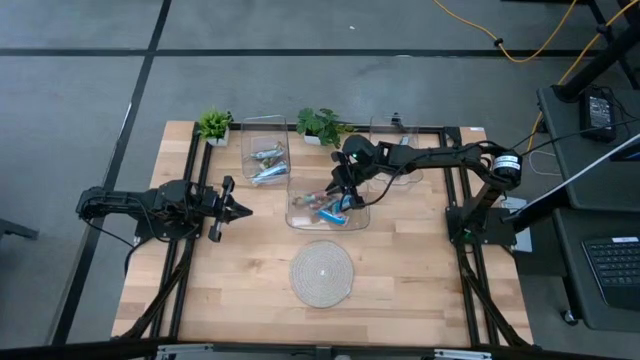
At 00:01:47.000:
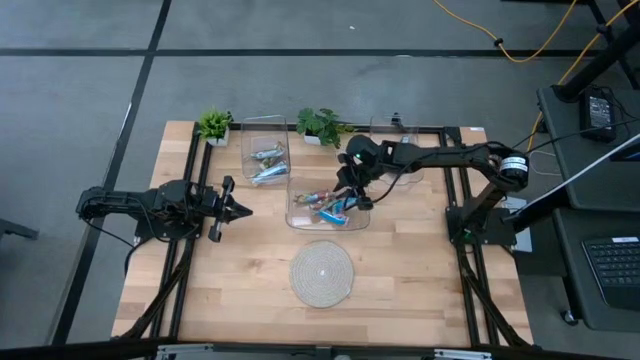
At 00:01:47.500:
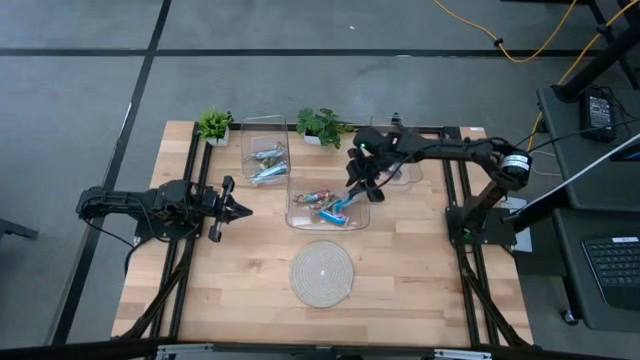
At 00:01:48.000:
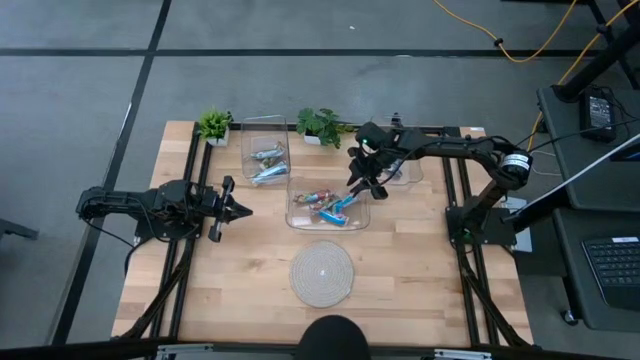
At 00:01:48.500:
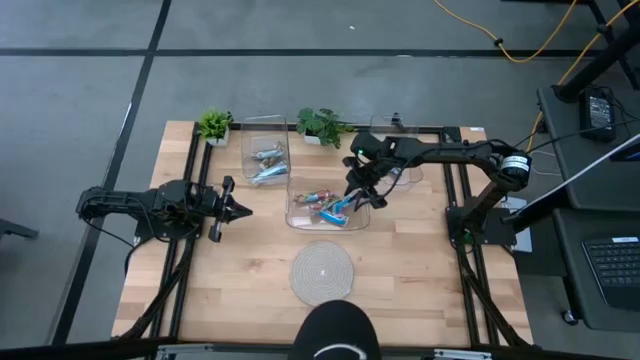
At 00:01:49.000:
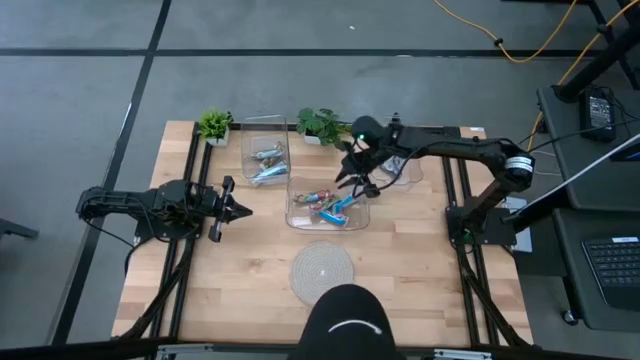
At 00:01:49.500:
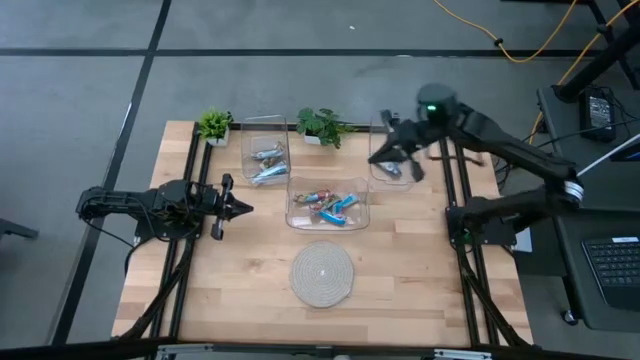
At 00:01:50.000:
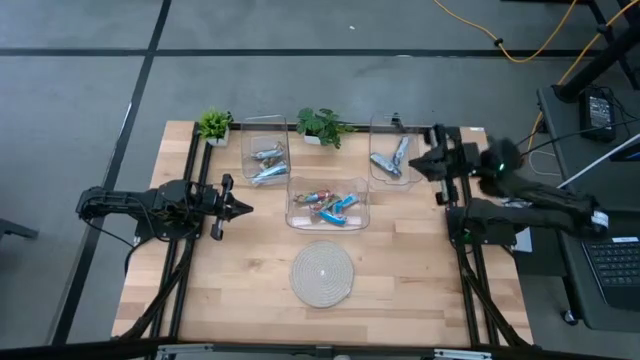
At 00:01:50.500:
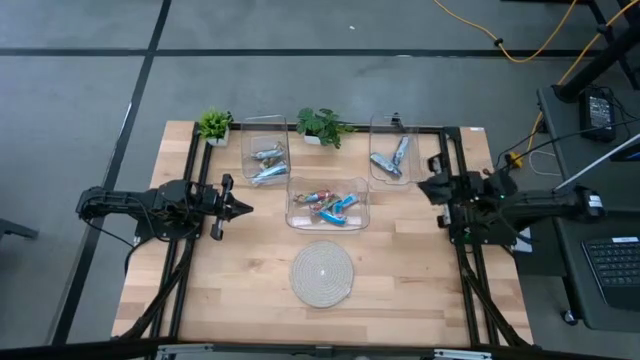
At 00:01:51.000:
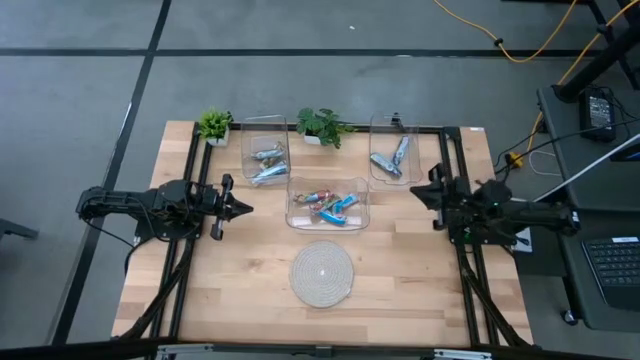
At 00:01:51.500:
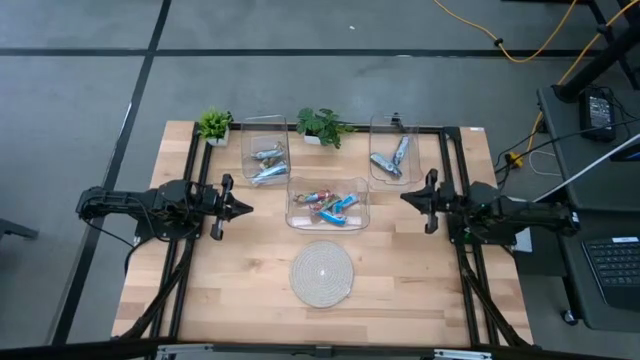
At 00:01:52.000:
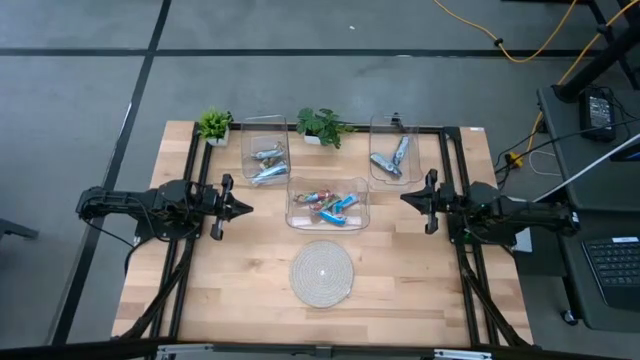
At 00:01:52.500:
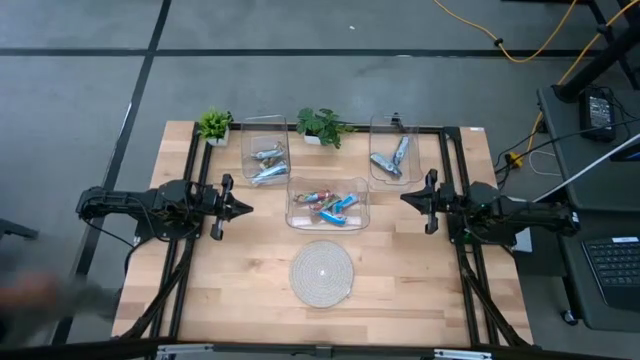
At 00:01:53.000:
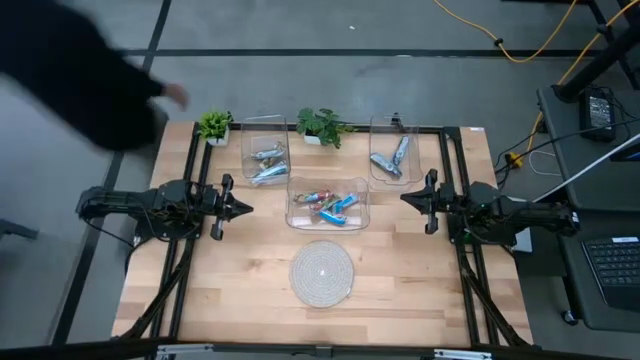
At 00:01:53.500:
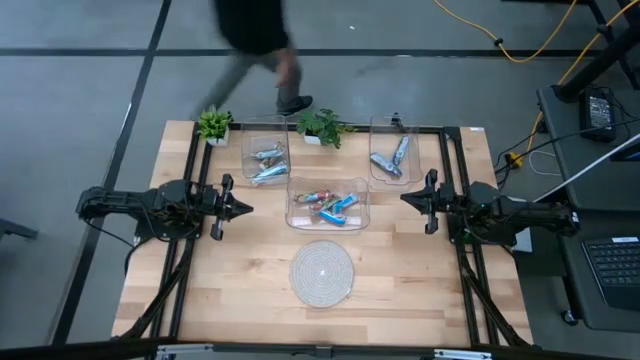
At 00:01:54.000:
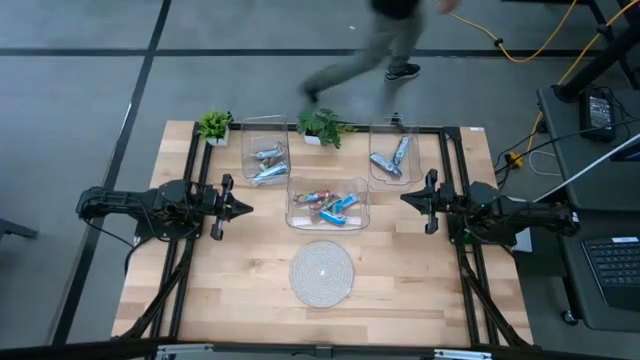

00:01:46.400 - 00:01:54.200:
Task: Pick and place Granola Bars by type
Return to Home Position

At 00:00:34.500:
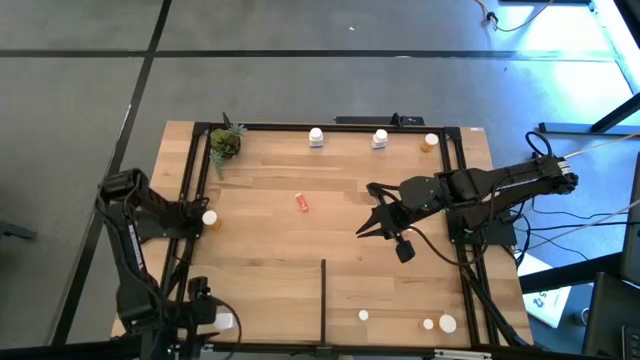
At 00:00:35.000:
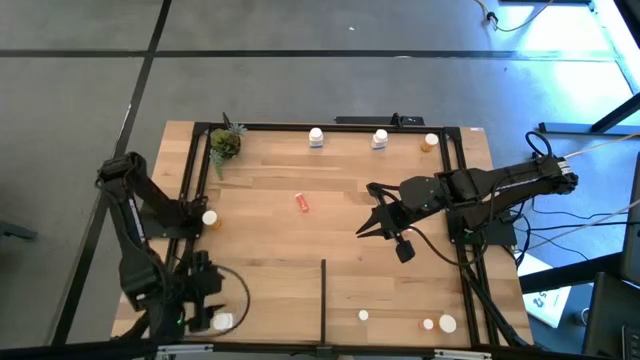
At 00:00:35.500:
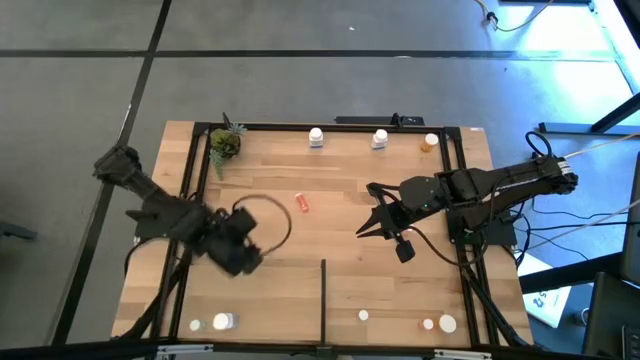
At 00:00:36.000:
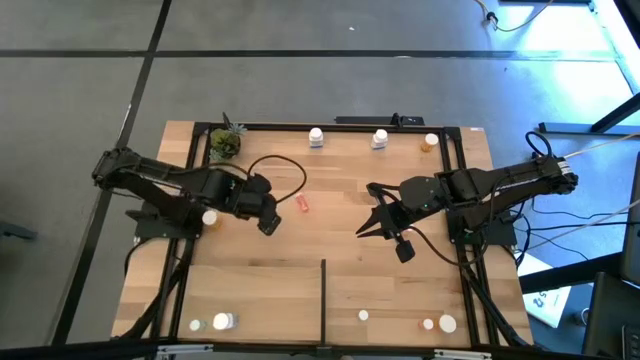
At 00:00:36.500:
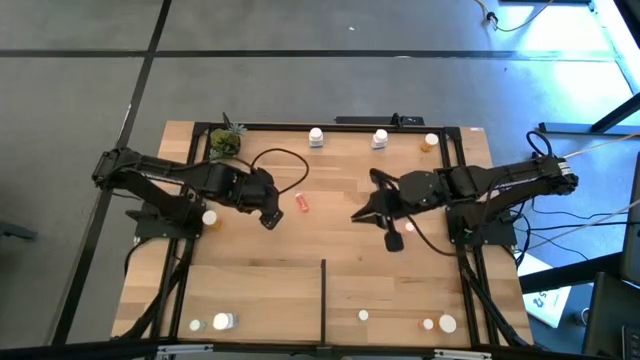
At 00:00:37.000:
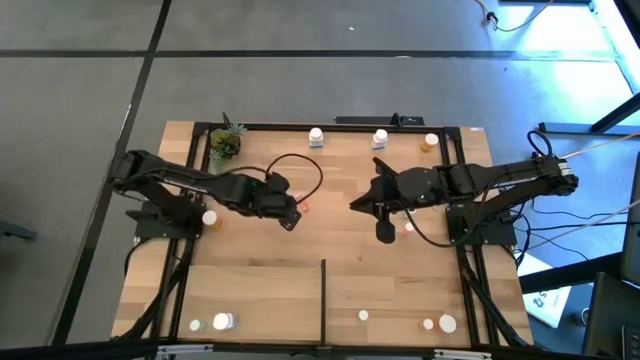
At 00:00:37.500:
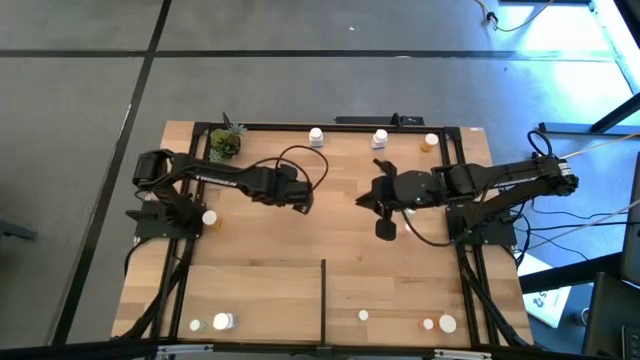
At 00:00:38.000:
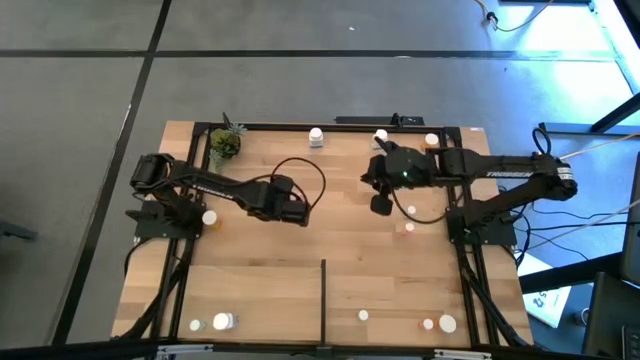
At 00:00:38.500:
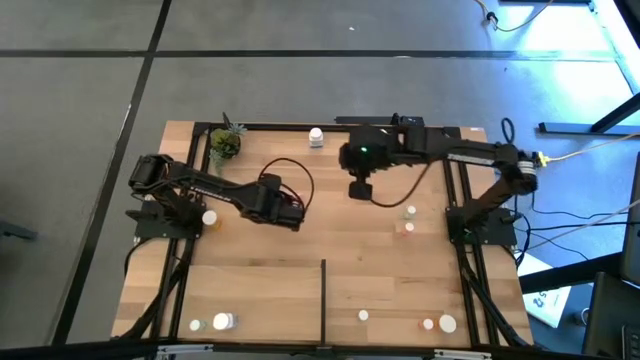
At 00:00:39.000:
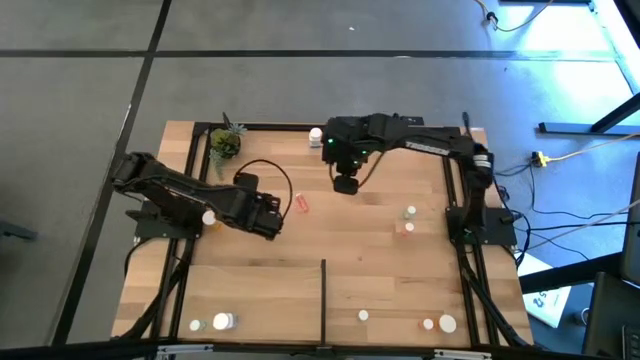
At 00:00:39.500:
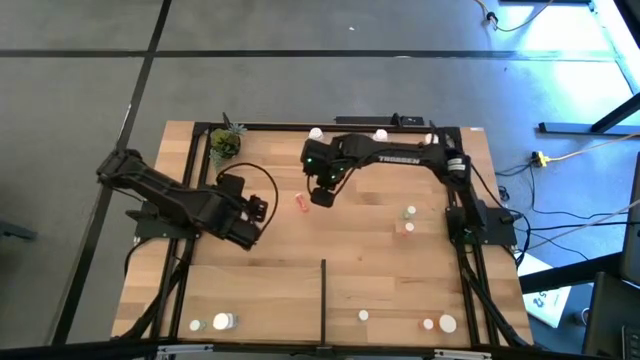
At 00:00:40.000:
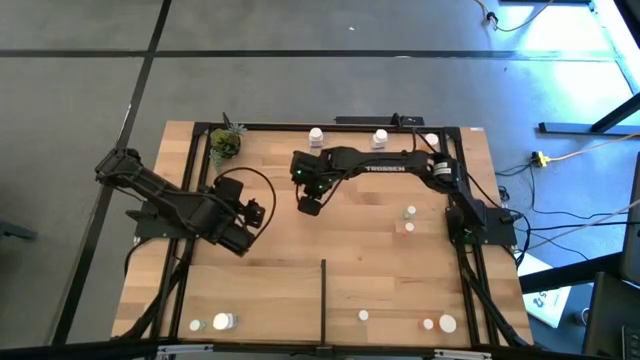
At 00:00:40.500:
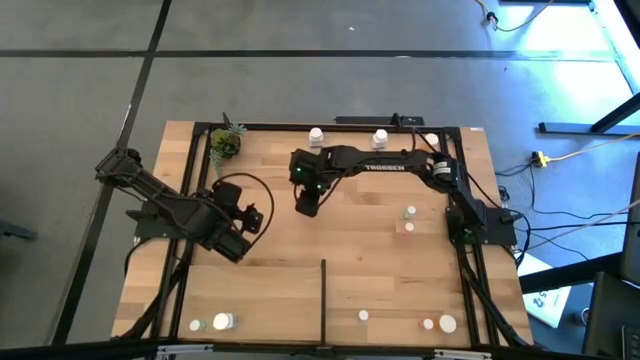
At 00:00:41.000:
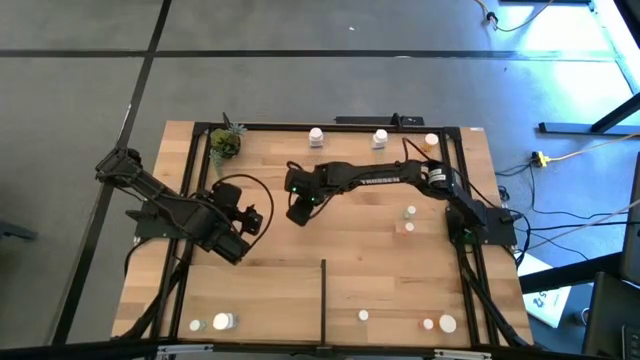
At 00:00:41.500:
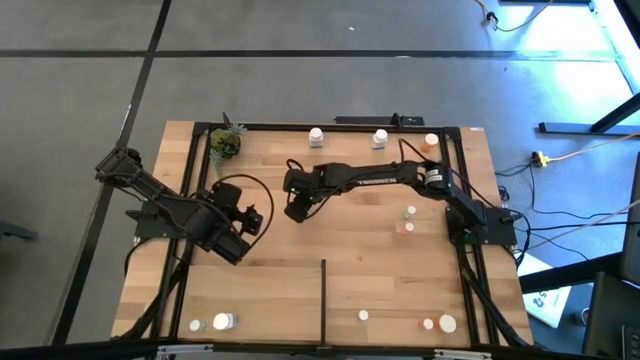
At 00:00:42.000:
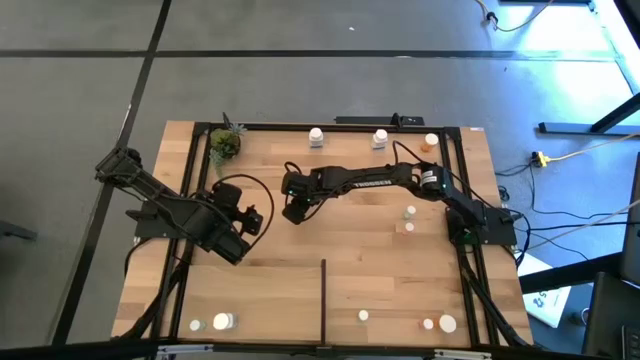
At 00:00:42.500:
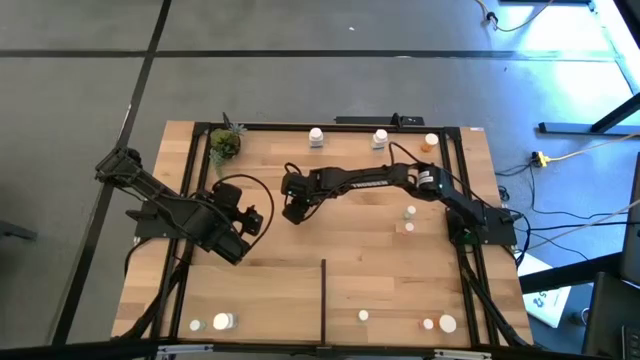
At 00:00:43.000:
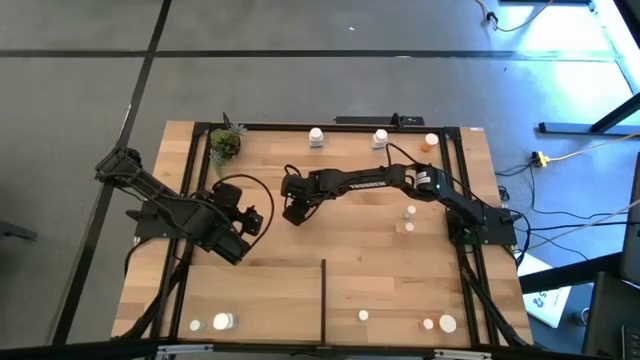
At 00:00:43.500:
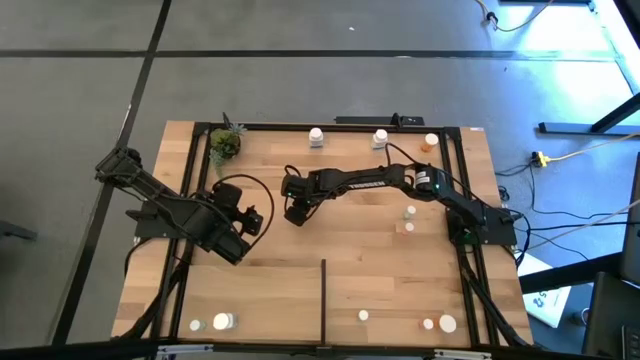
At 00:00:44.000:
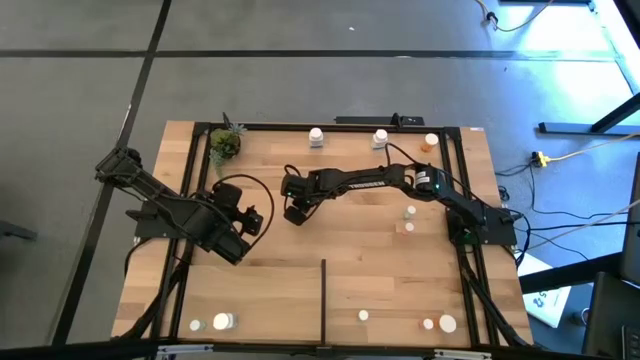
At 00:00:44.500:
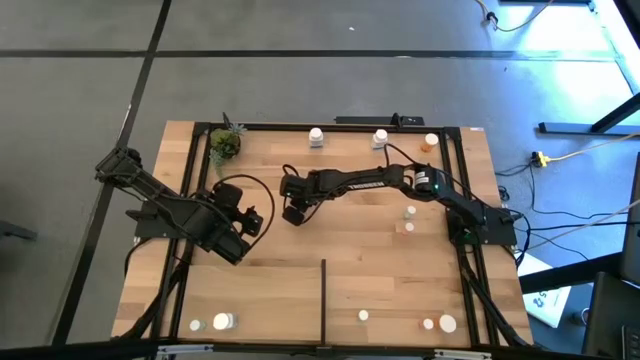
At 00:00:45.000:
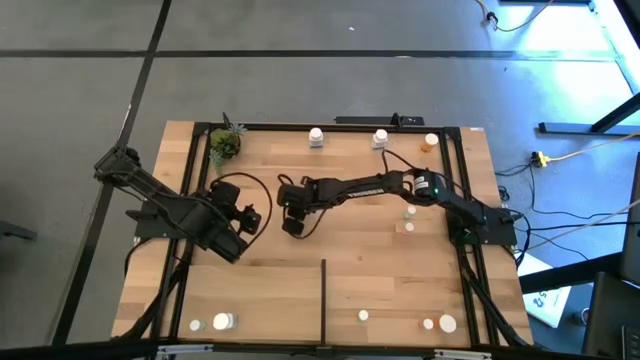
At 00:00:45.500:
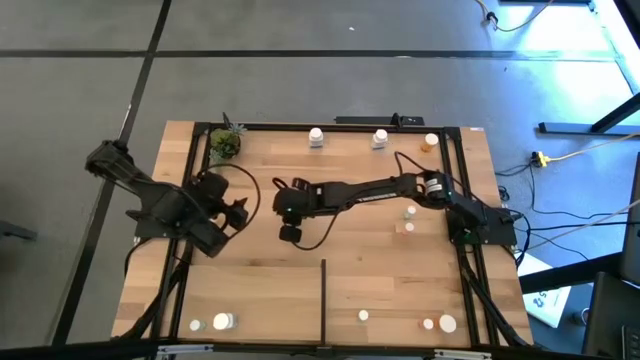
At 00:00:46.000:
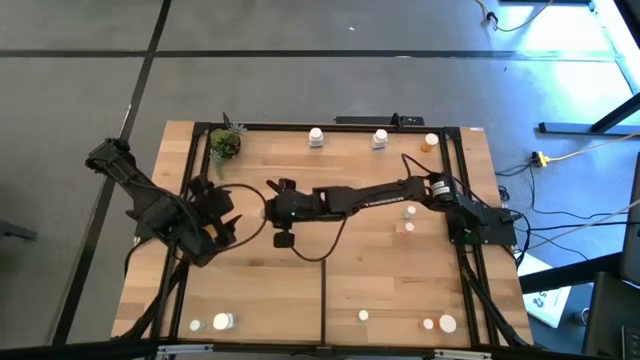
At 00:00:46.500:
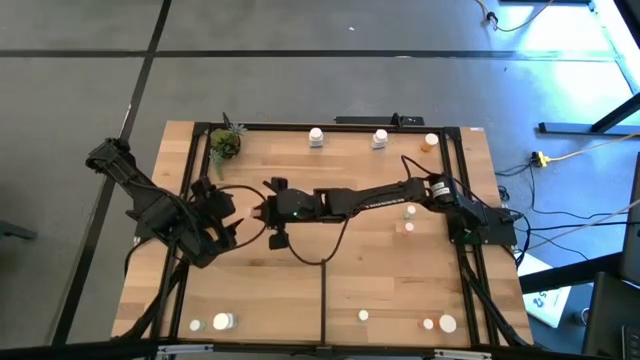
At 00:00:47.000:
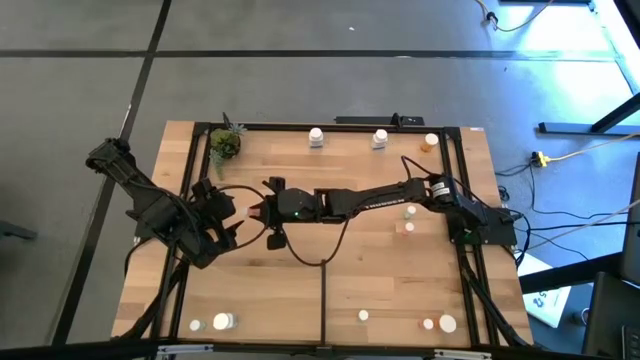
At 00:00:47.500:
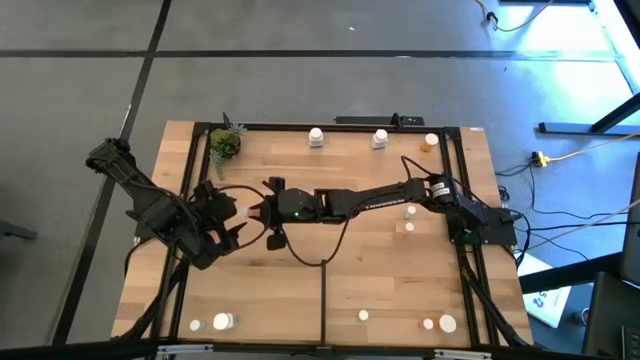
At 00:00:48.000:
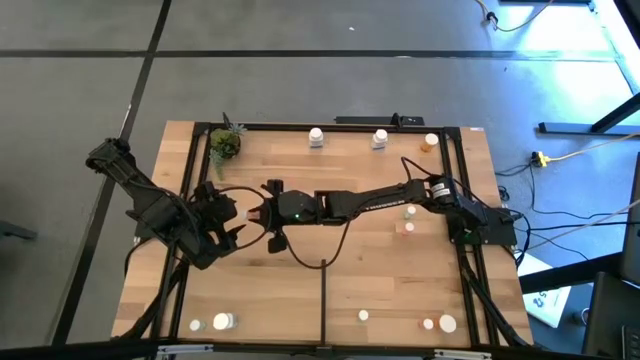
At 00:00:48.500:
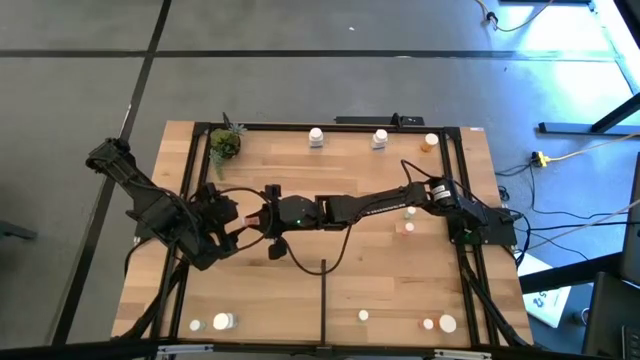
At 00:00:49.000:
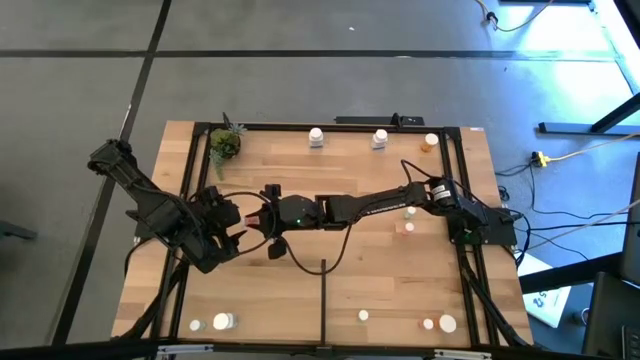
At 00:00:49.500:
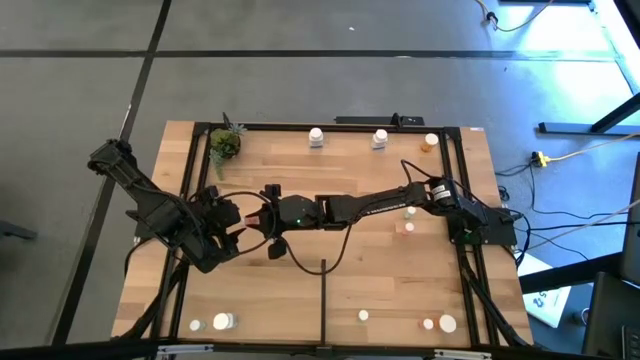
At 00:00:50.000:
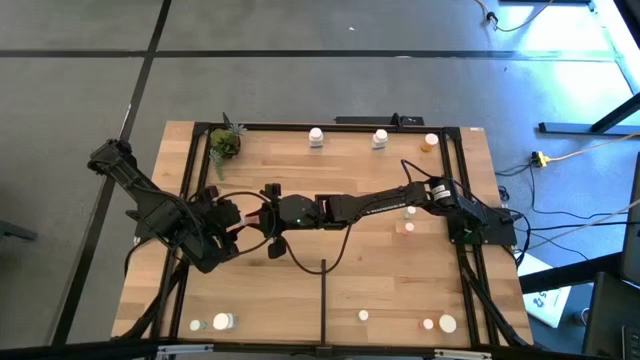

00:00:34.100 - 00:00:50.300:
Task: Pick and place medicine bottles onto shelf by color
Put the top left pink pill bottle on the shelf
